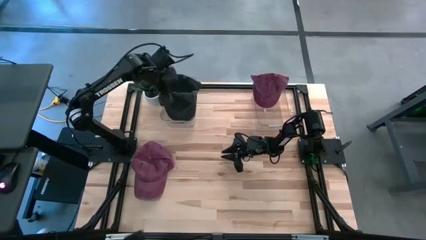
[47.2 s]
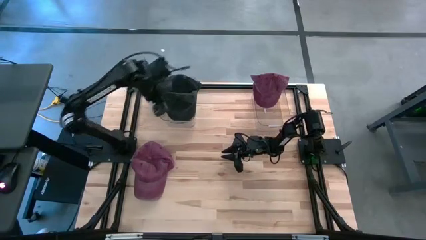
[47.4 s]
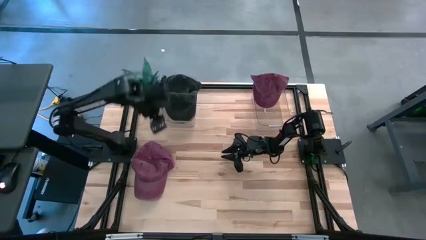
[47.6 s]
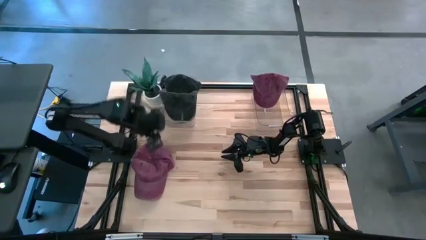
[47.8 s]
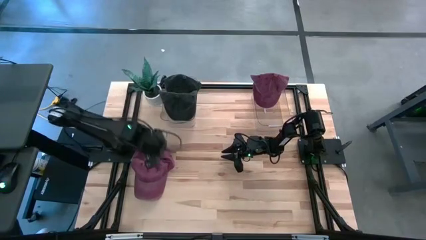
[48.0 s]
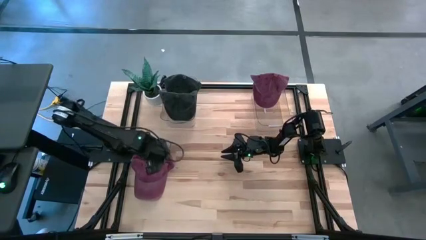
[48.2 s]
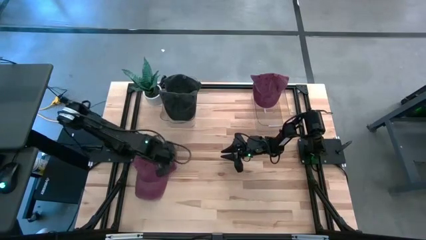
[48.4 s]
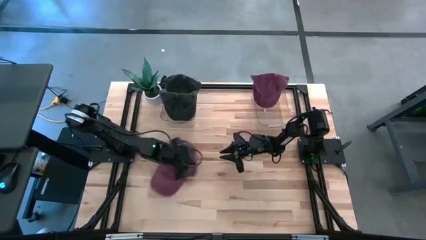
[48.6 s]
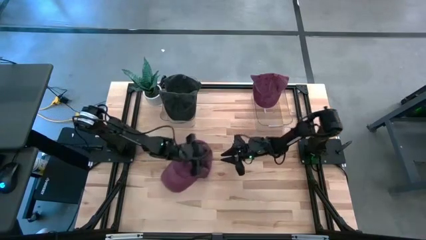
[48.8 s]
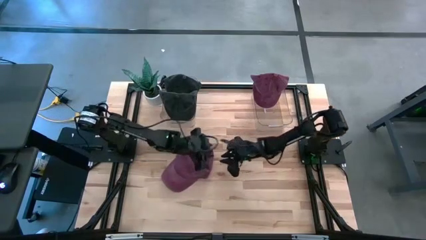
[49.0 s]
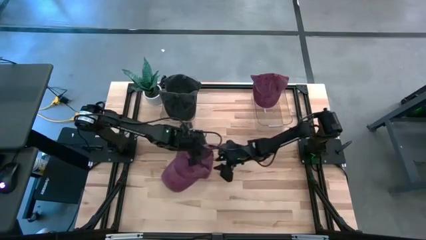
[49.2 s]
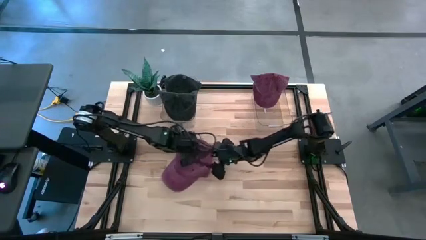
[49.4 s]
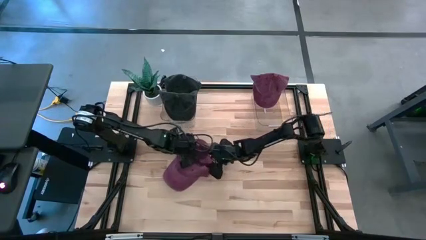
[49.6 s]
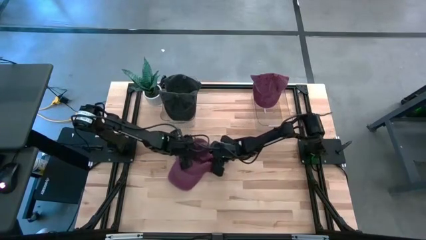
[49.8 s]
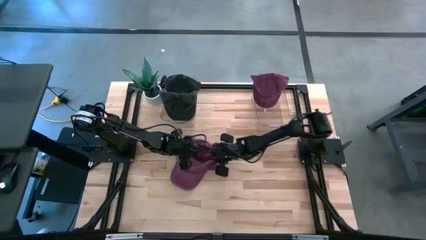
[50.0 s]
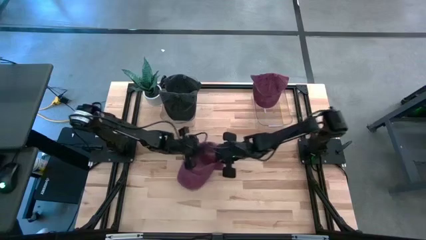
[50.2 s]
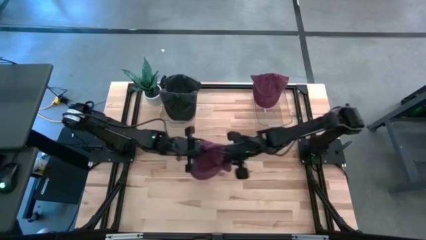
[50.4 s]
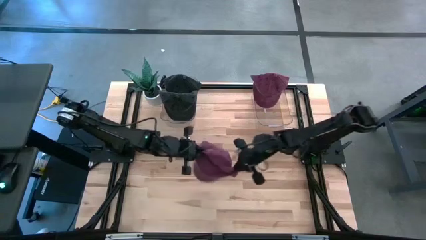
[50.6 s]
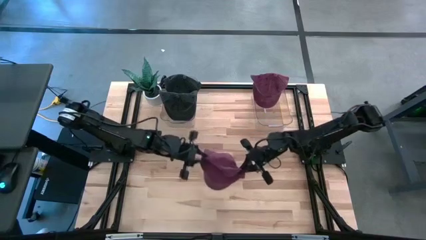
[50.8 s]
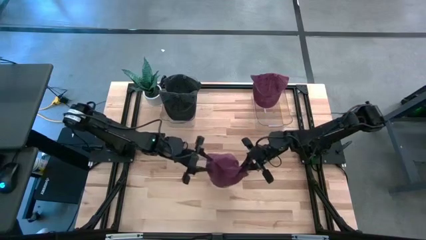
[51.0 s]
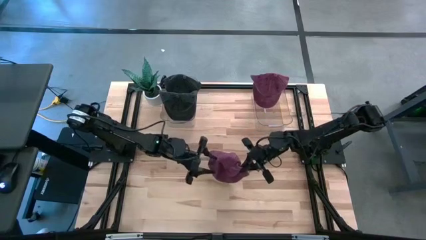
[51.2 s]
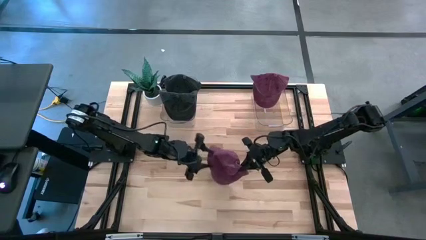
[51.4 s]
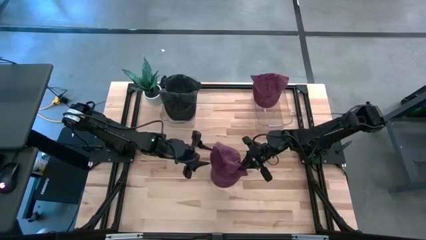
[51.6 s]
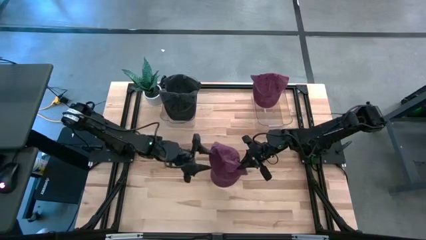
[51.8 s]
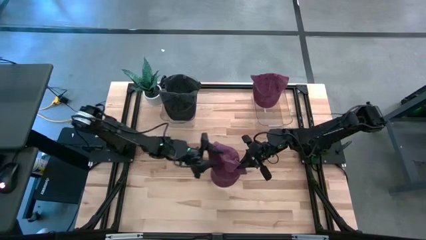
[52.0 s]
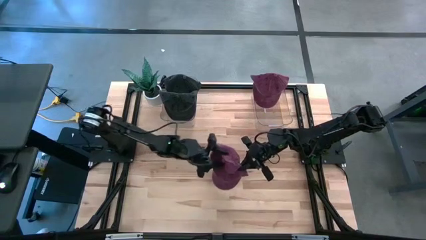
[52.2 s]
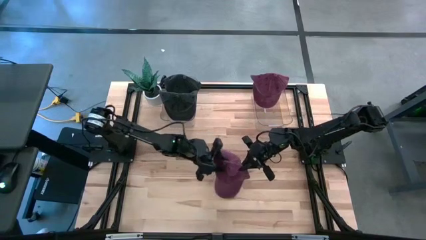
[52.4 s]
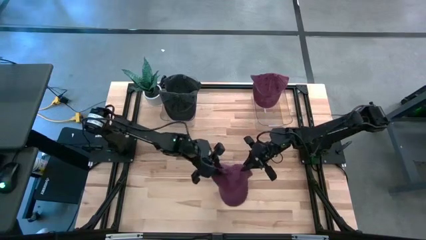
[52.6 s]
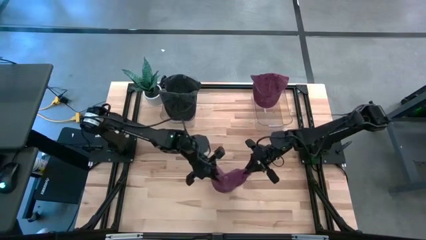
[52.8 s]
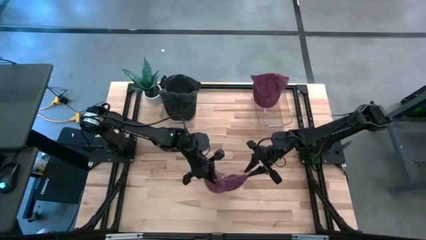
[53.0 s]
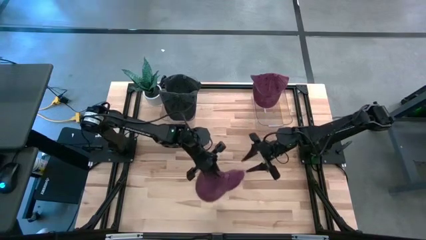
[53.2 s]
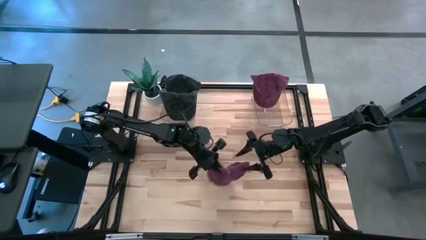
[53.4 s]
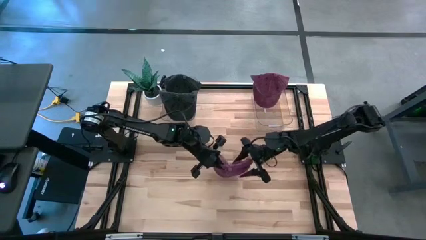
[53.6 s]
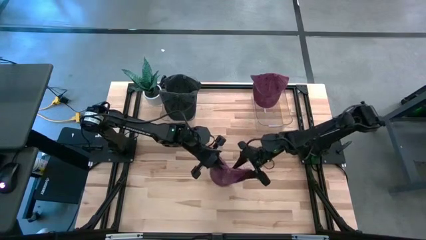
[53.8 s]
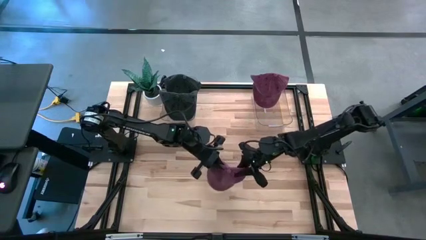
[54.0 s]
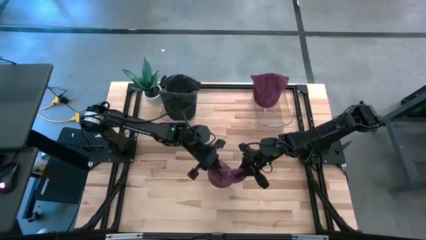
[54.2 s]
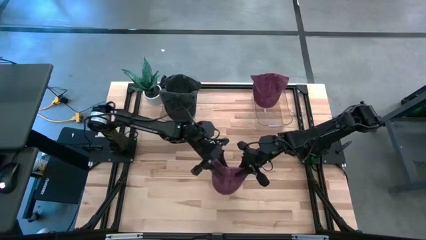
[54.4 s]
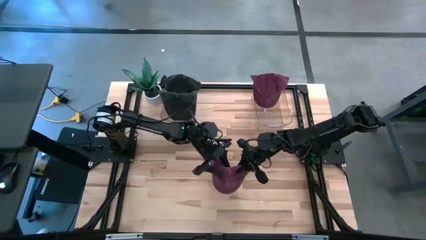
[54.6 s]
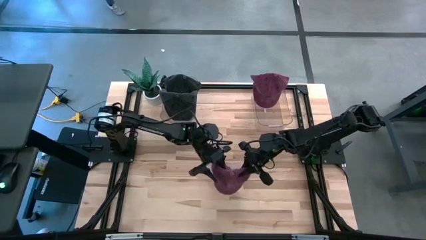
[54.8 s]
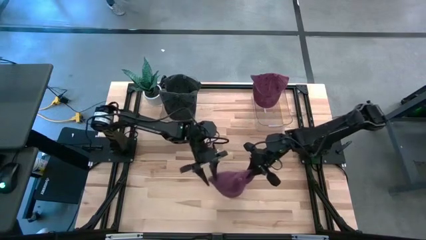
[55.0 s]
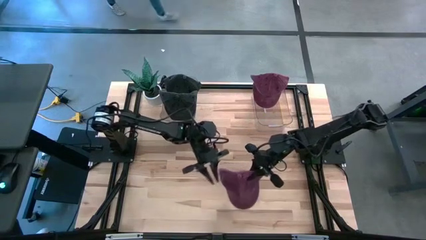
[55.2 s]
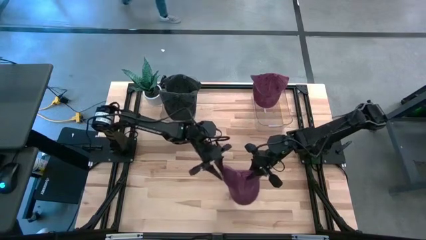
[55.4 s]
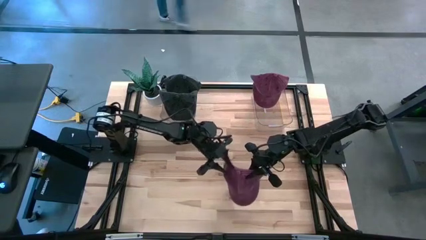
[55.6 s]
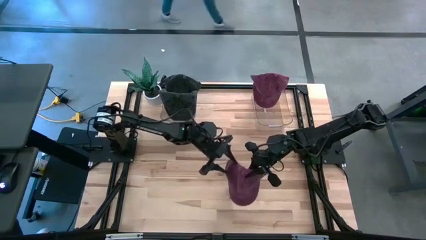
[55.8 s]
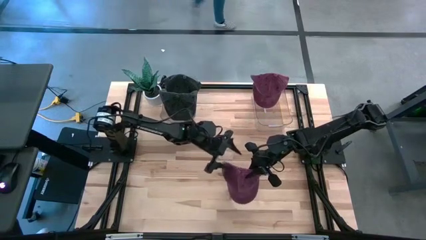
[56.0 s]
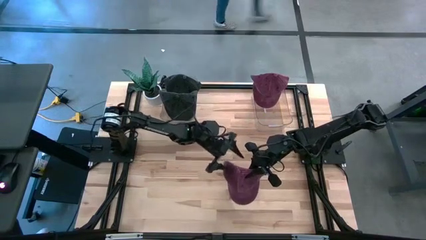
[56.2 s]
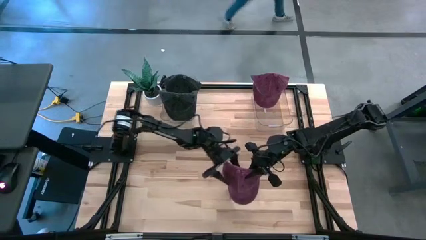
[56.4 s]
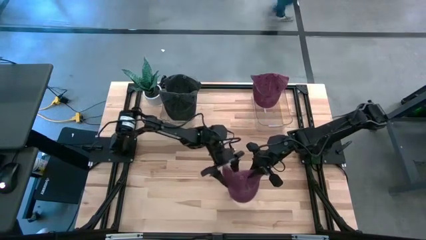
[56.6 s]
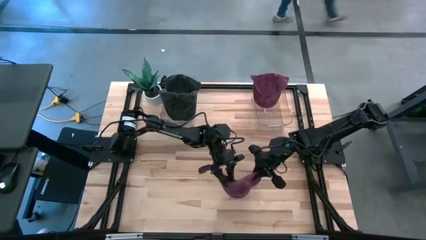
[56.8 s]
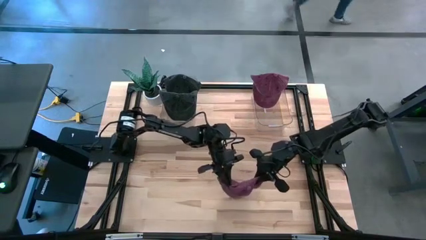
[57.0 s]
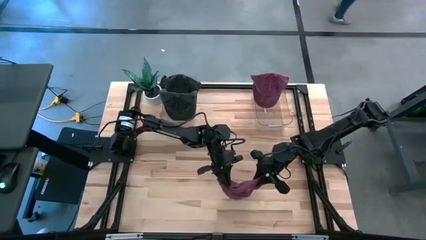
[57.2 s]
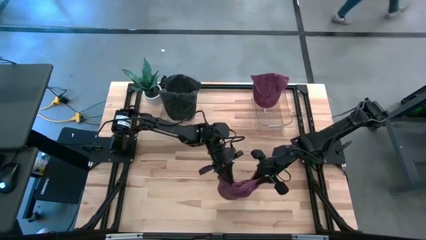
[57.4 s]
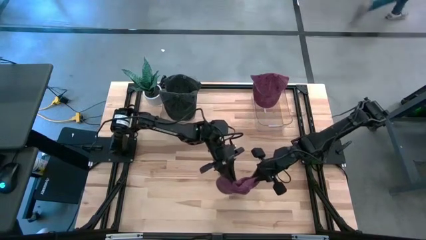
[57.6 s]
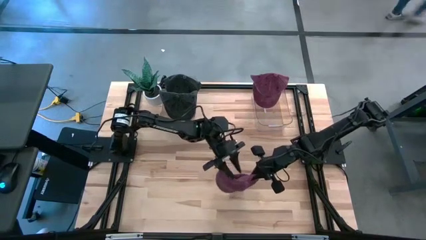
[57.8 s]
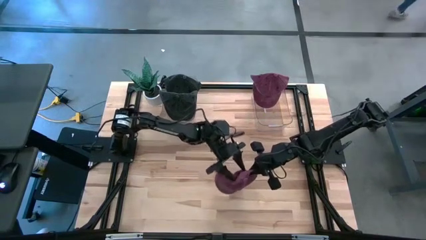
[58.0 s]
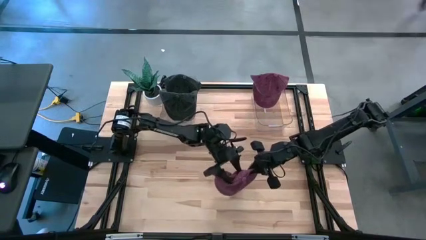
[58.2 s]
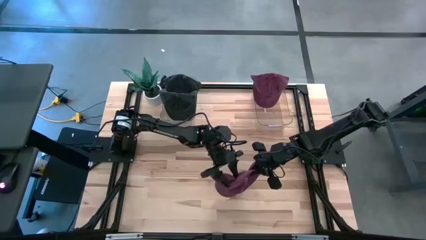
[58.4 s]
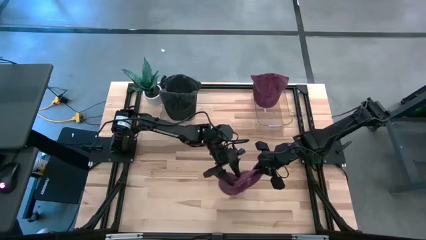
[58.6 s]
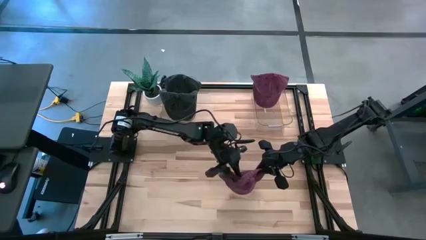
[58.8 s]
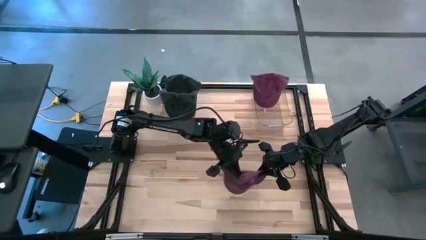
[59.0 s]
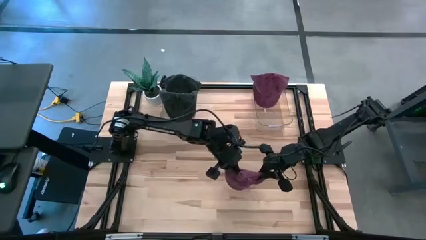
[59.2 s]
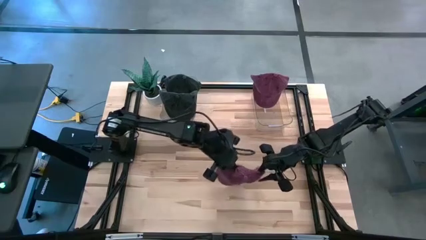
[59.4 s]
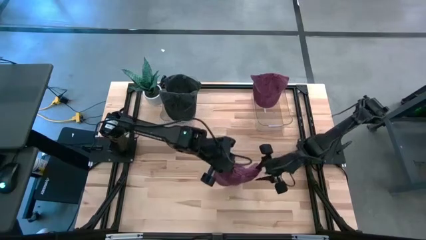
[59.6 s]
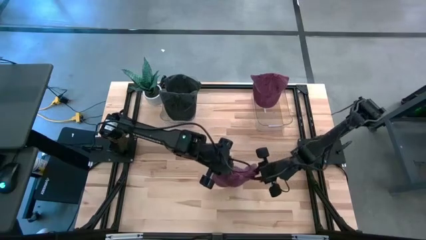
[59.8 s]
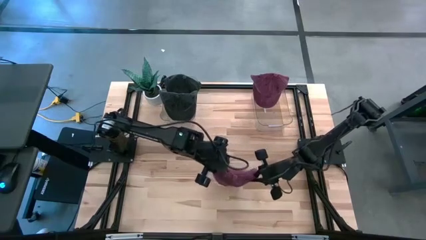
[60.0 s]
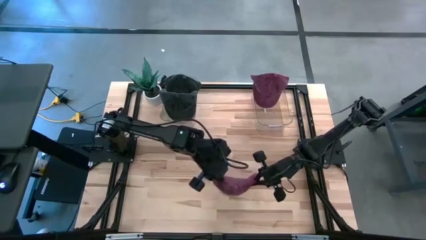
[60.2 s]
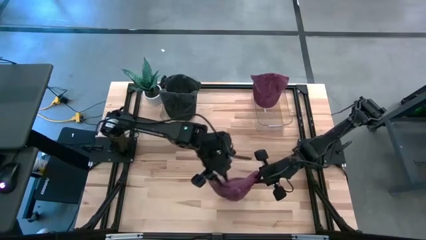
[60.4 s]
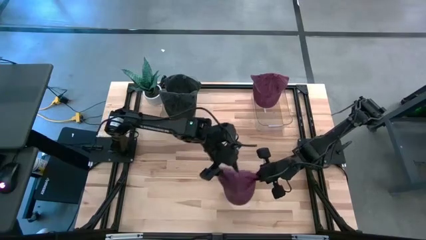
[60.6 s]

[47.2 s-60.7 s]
Task: Pick & Place hat
Put the red cap into the right transparent bin

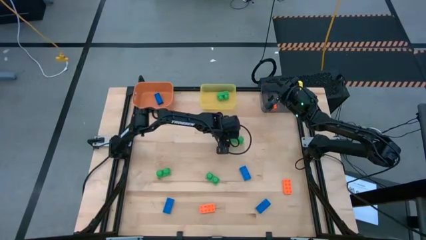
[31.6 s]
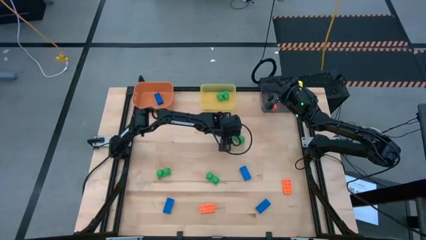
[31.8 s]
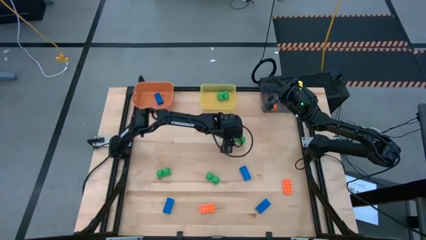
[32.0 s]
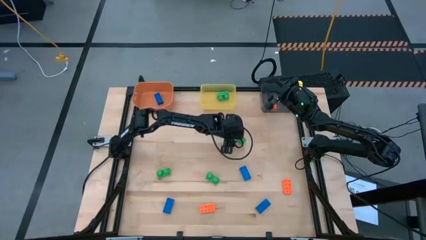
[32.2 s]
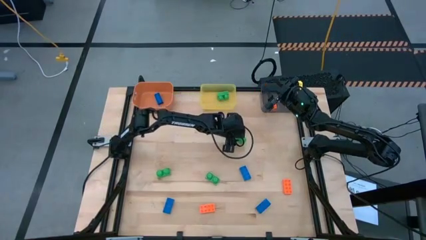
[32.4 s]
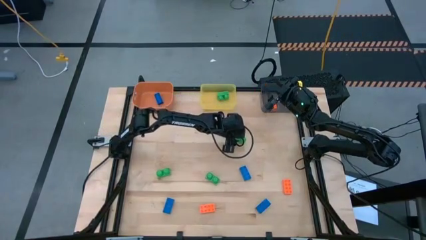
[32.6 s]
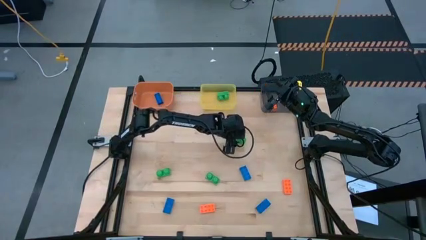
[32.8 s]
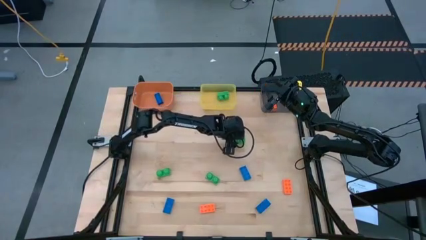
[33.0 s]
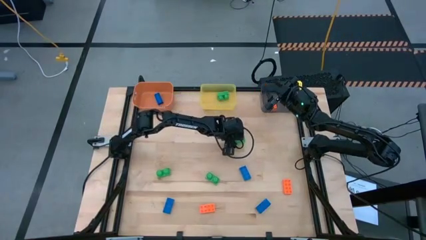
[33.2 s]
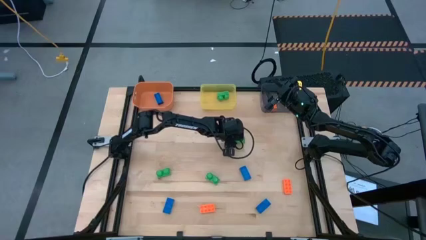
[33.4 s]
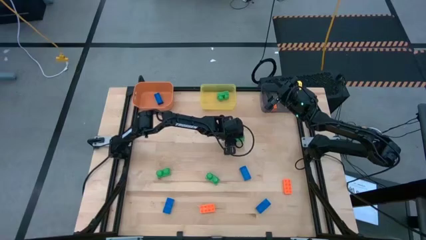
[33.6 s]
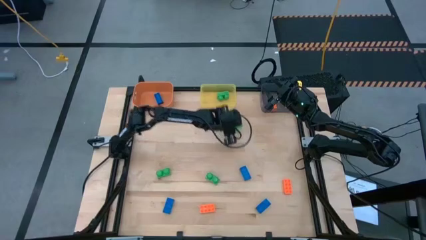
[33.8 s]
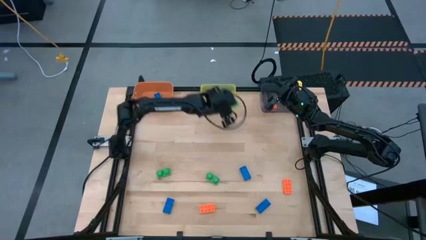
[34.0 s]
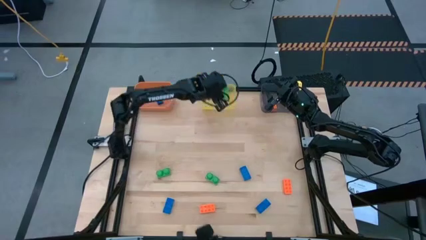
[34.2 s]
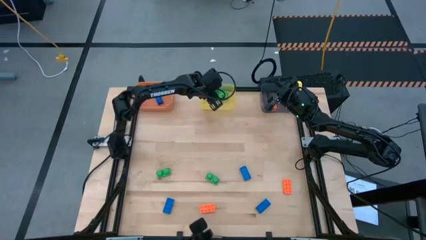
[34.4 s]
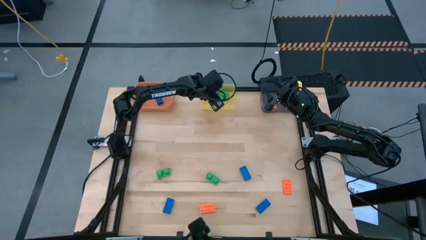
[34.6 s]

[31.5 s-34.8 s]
Task: Sort & place blocks by color
Put the green game piece into the yellow bin
